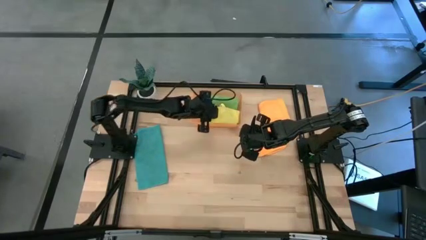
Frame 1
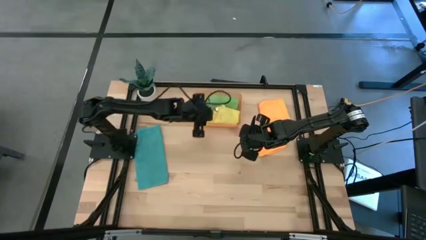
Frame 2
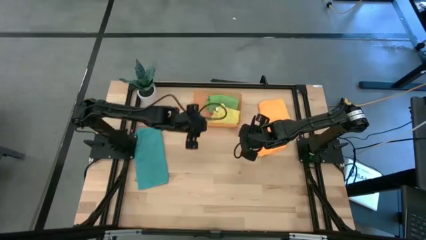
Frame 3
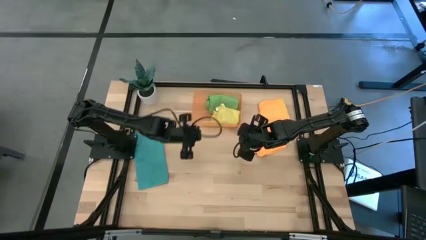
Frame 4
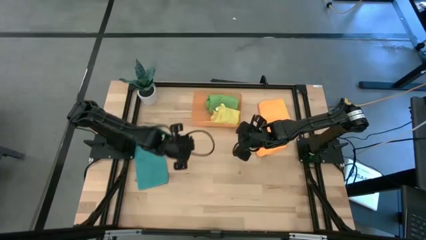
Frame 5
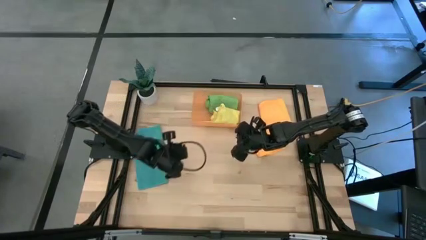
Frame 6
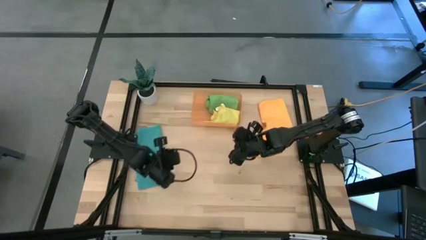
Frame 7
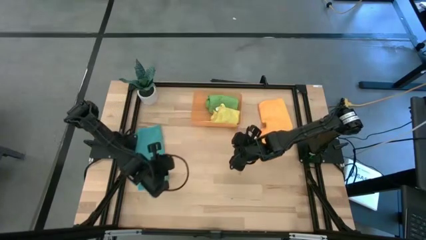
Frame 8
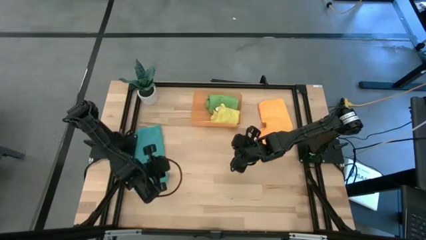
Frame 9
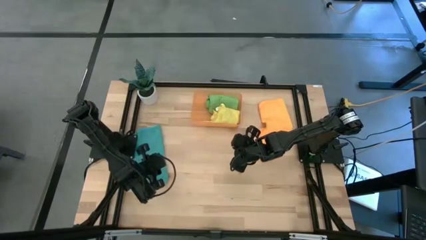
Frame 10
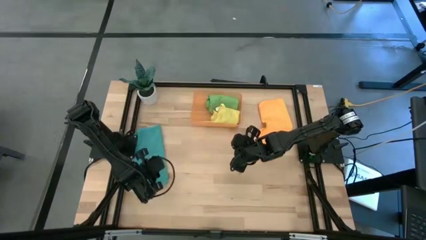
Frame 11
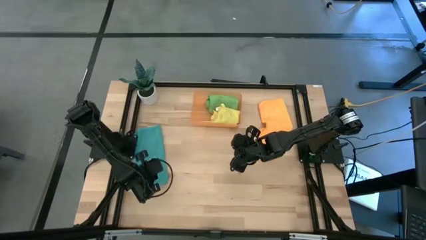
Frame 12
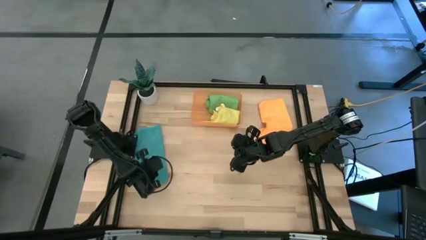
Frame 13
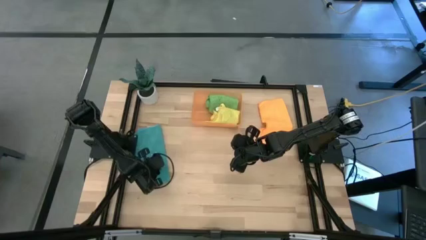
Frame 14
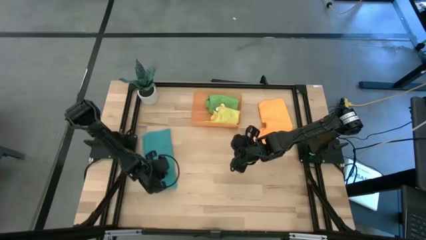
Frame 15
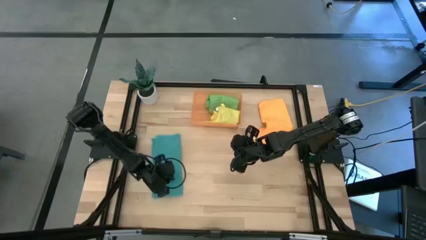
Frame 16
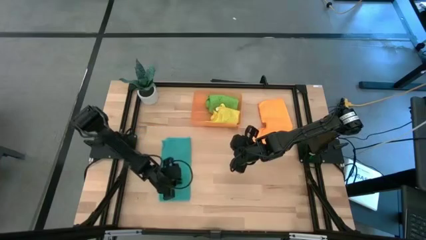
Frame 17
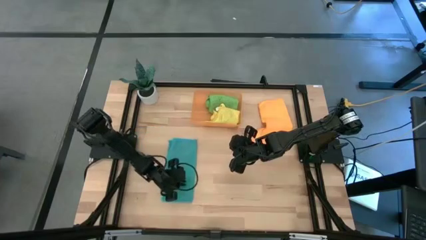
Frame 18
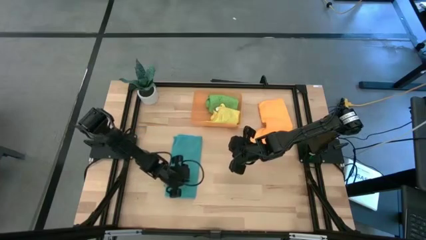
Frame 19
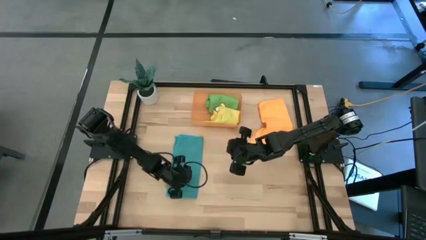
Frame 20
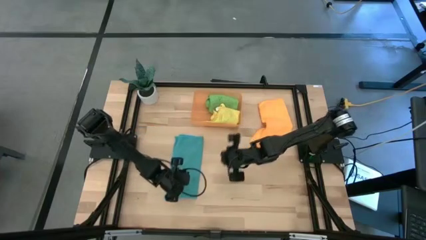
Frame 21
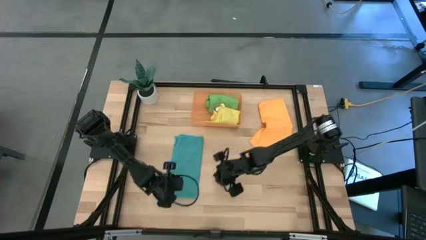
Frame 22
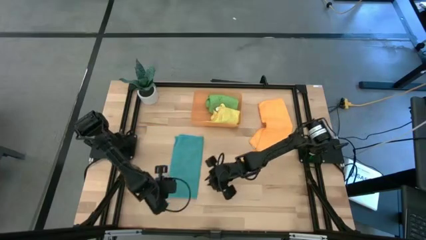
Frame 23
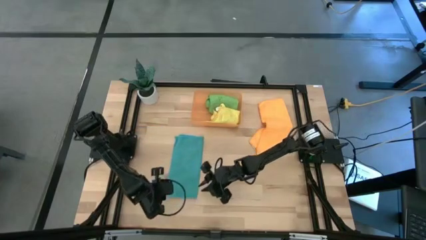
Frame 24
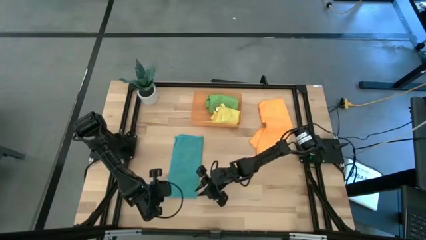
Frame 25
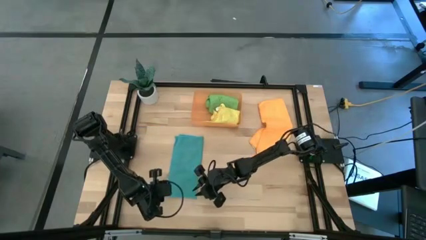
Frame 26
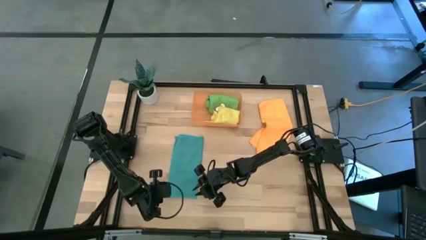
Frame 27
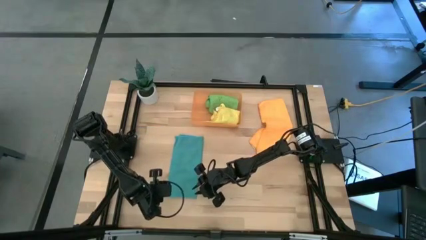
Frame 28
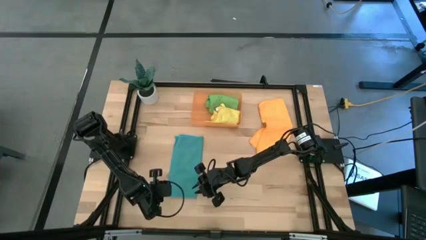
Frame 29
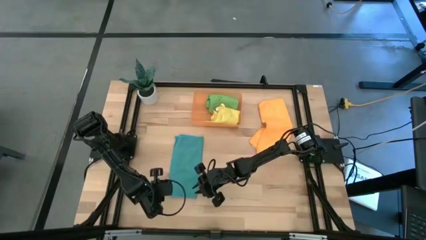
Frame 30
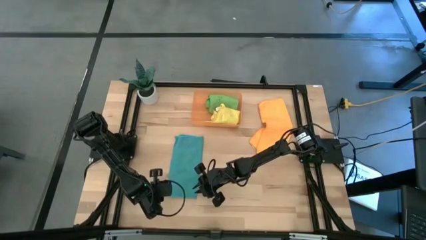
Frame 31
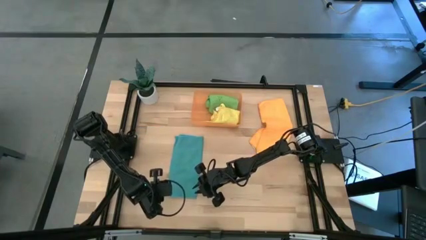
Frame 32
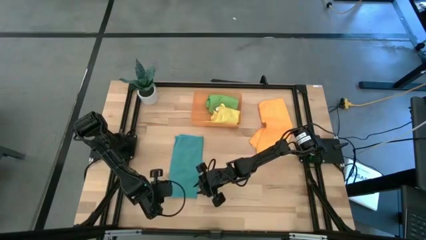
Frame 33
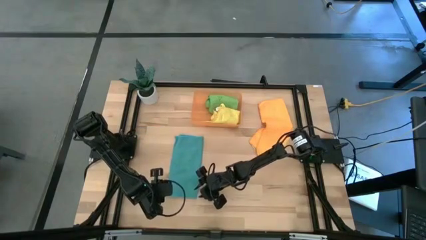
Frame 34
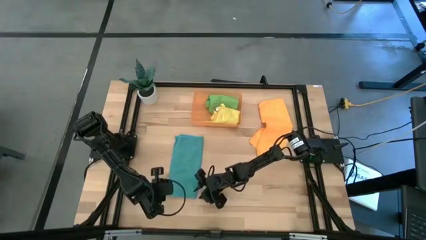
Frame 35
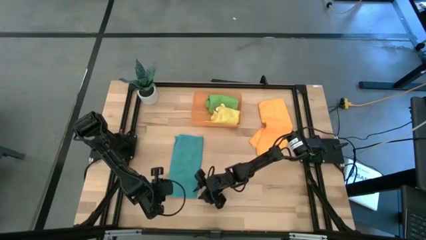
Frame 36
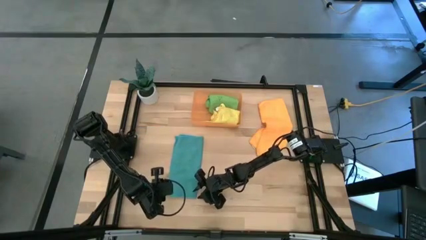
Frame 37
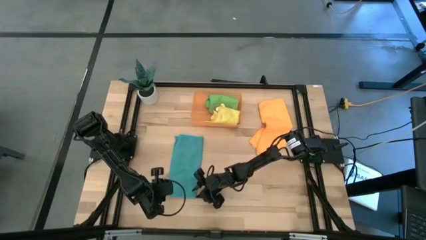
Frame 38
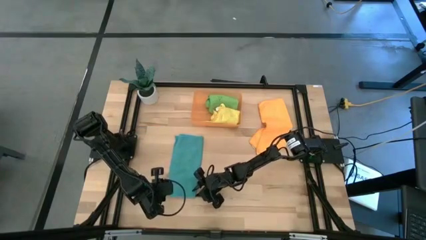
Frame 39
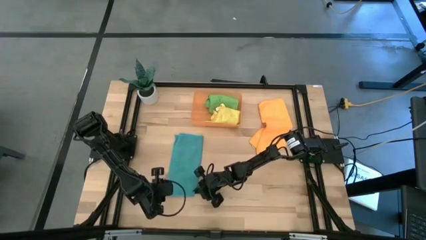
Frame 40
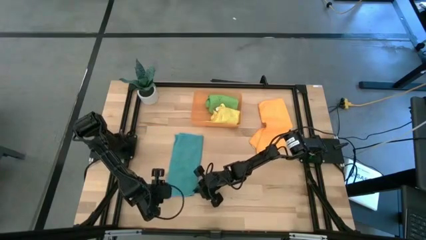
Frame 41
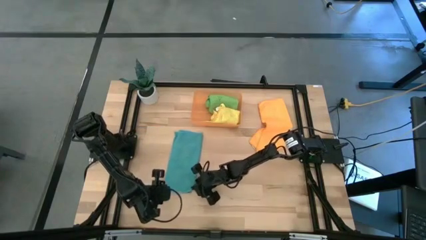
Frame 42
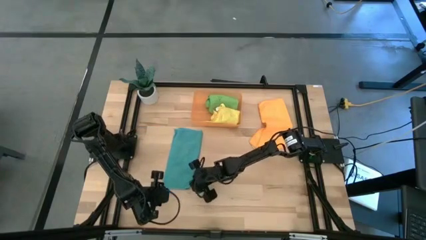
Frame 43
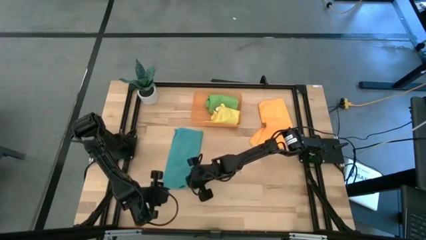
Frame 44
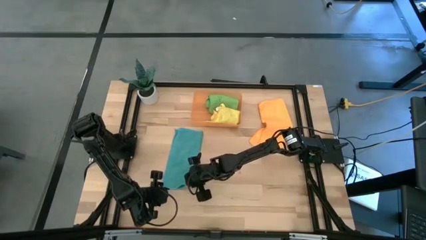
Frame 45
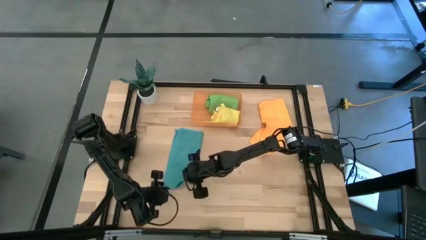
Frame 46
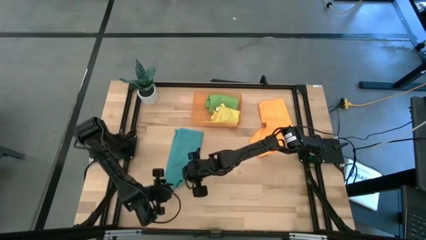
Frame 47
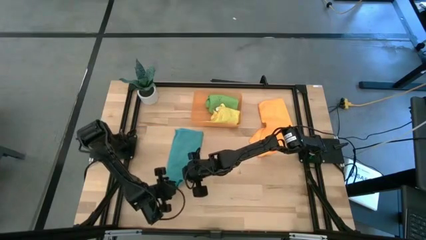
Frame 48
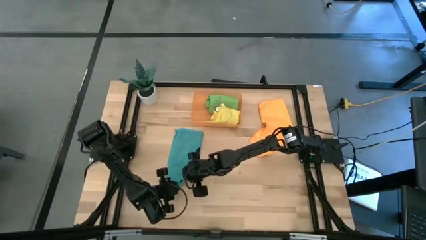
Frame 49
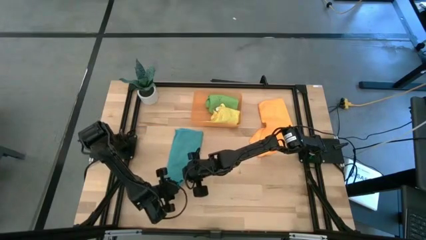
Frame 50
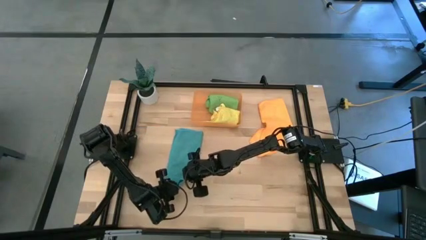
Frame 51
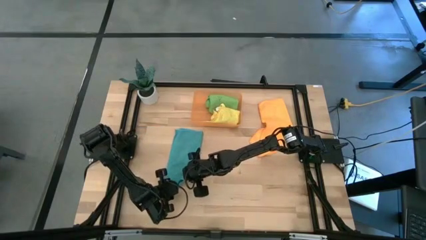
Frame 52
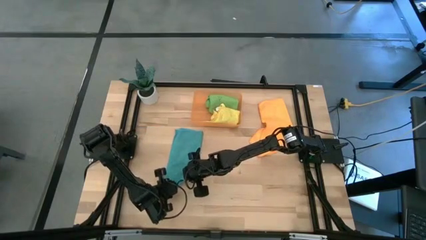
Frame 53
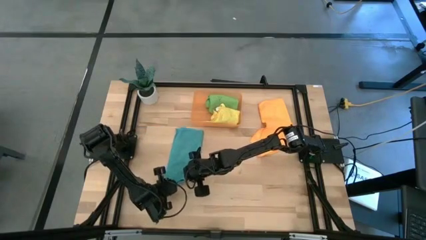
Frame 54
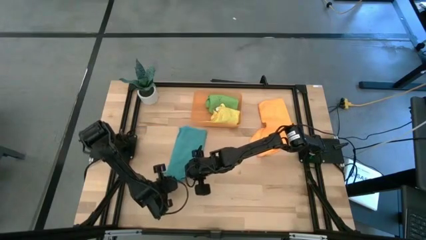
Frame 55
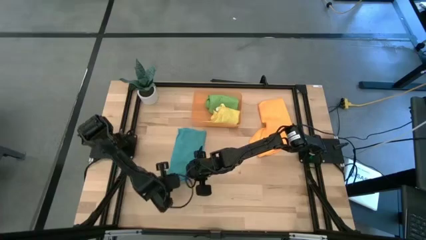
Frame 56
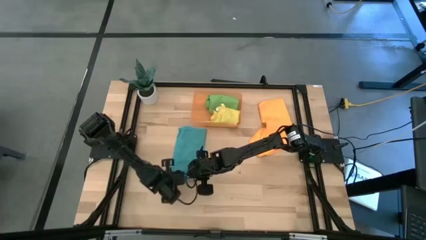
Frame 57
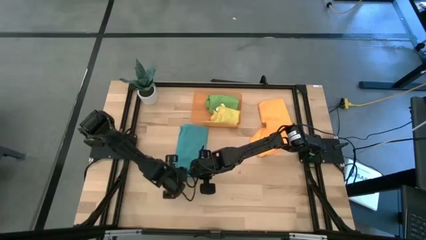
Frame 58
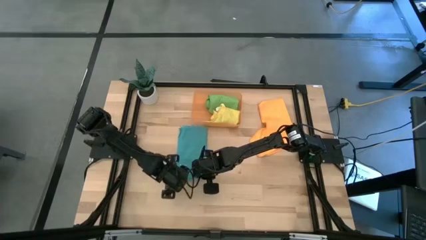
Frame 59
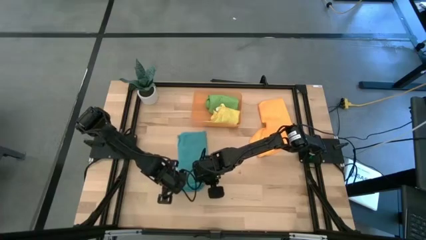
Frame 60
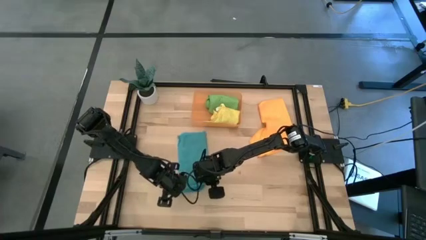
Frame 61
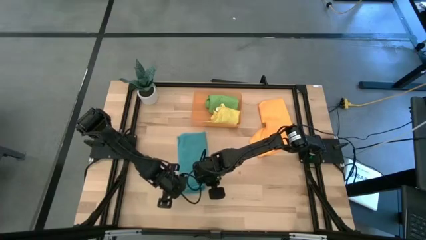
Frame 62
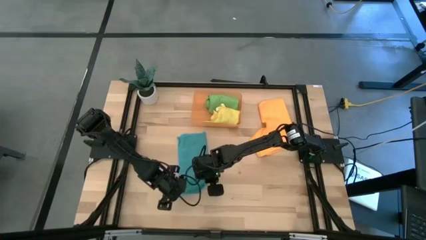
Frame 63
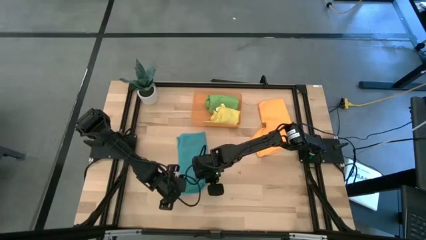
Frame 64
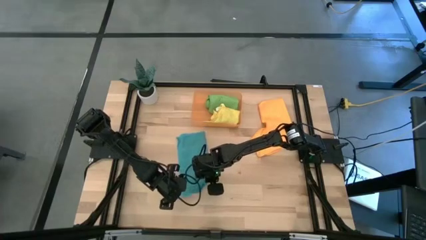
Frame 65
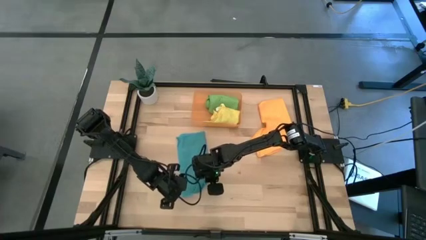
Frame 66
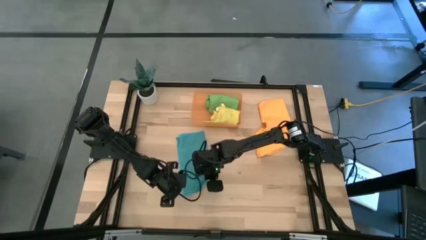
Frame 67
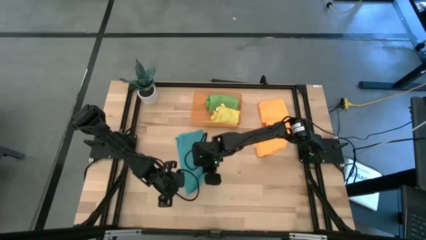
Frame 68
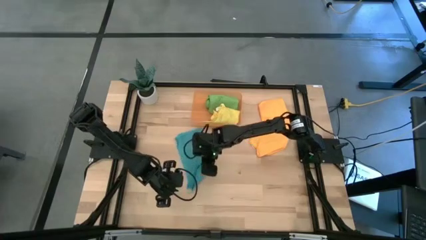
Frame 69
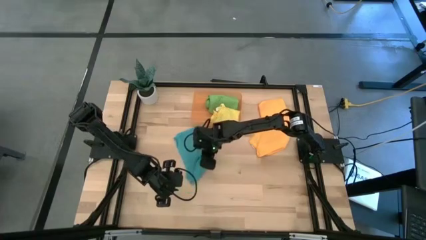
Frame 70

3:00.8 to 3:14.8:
Task: Roll microfiber towels into tight, uniform cylinder then place into a basket
Roll the blue microfiber cloth
